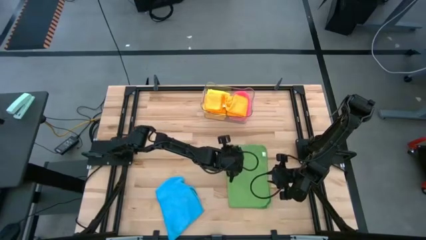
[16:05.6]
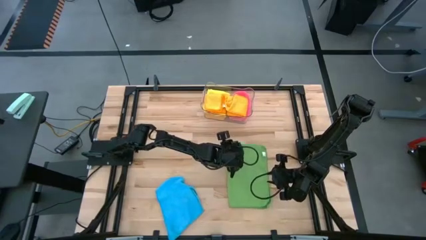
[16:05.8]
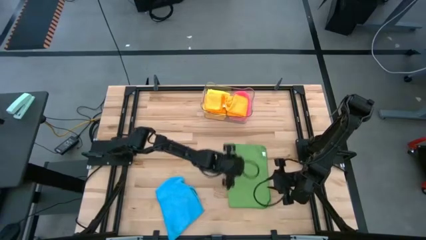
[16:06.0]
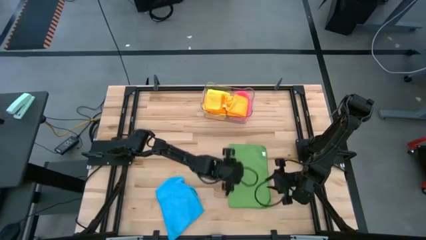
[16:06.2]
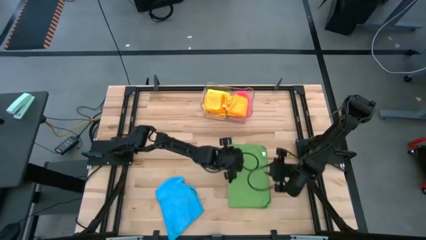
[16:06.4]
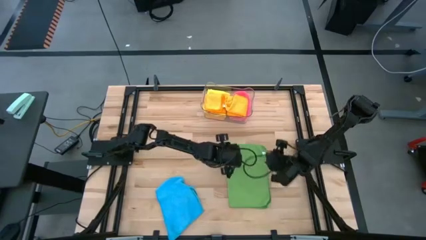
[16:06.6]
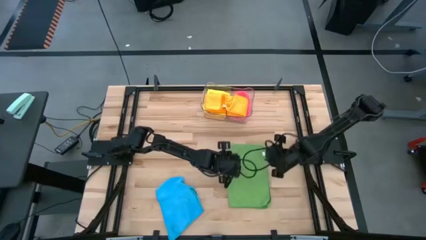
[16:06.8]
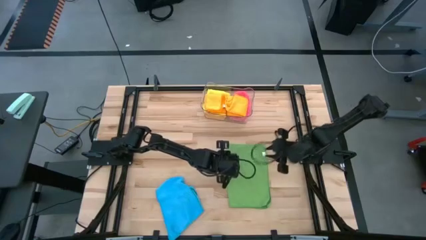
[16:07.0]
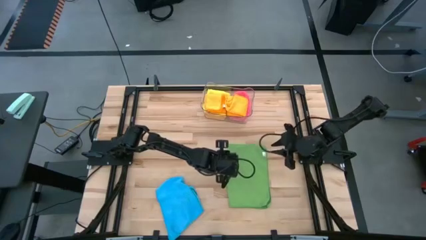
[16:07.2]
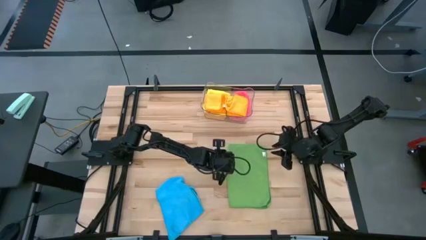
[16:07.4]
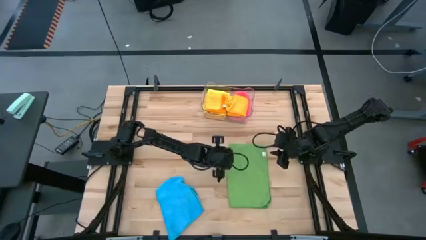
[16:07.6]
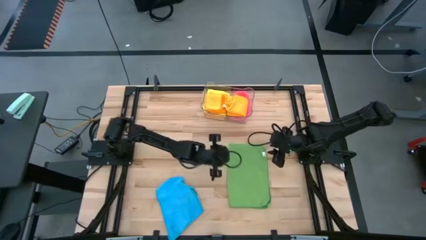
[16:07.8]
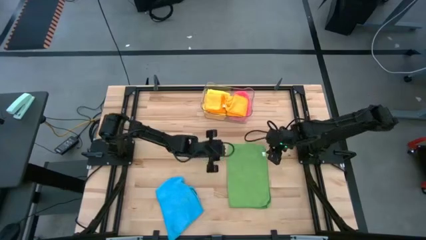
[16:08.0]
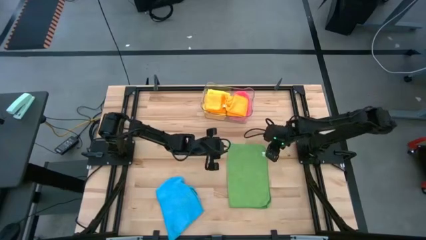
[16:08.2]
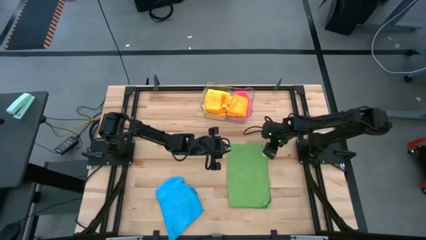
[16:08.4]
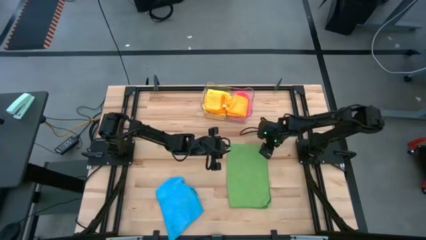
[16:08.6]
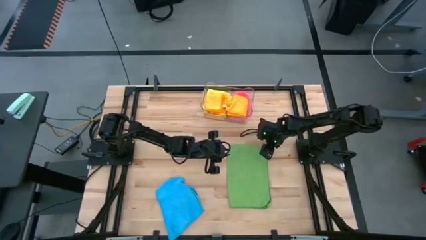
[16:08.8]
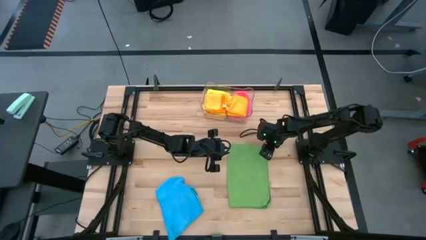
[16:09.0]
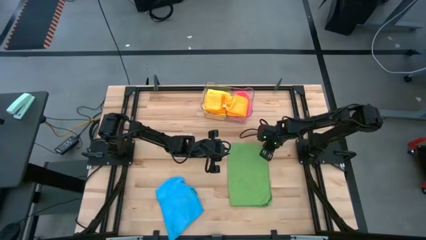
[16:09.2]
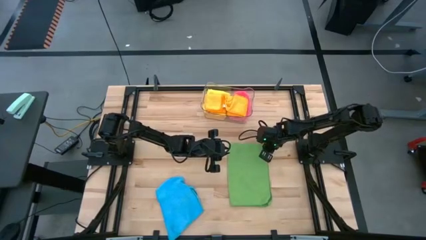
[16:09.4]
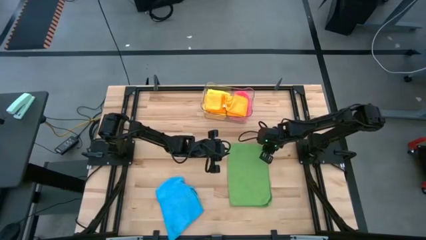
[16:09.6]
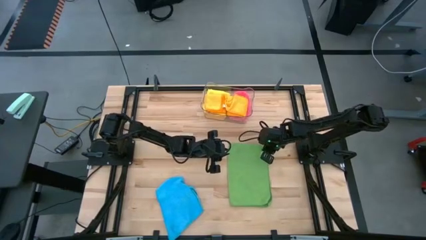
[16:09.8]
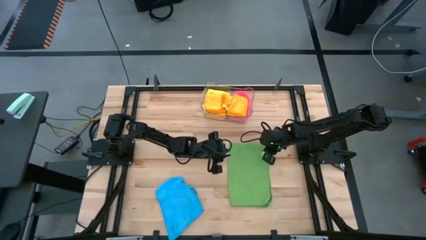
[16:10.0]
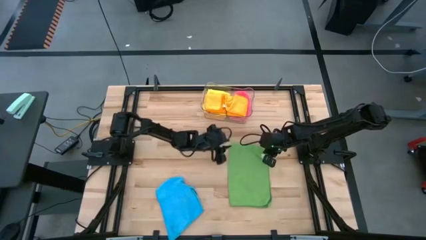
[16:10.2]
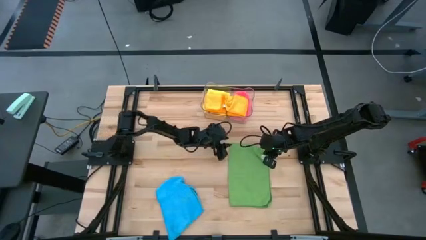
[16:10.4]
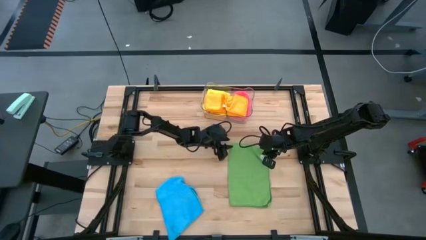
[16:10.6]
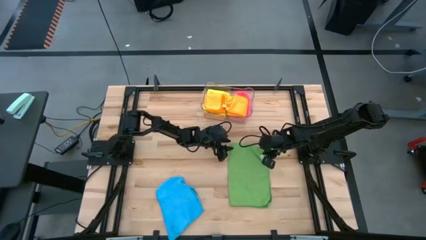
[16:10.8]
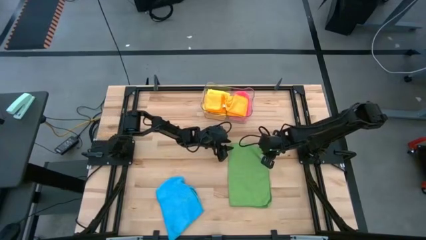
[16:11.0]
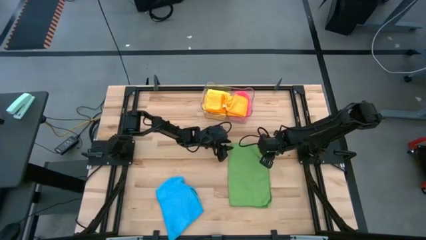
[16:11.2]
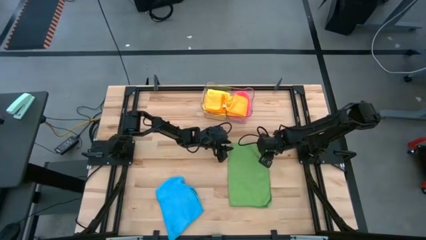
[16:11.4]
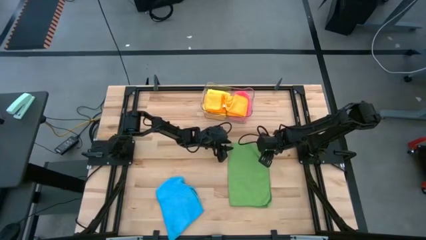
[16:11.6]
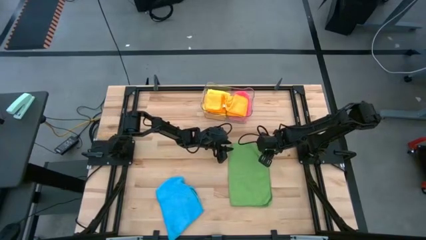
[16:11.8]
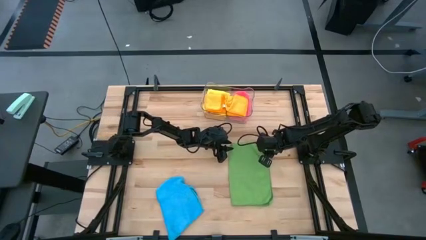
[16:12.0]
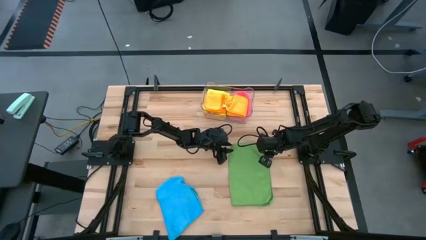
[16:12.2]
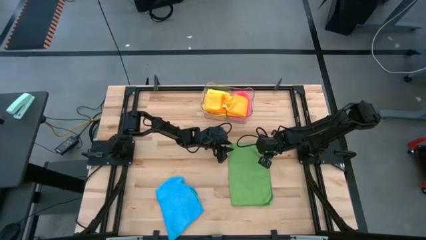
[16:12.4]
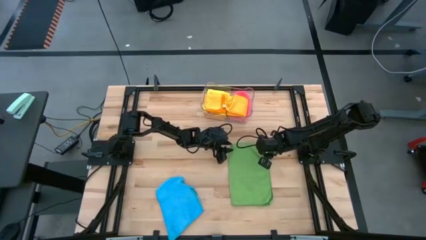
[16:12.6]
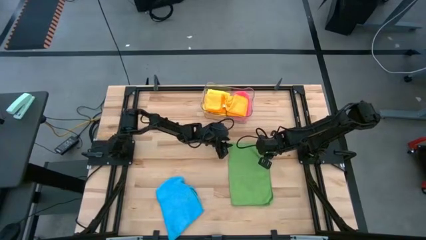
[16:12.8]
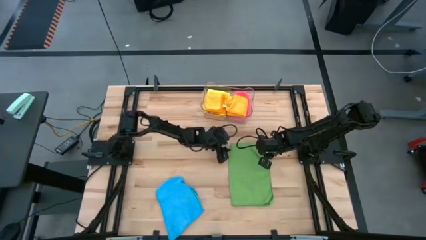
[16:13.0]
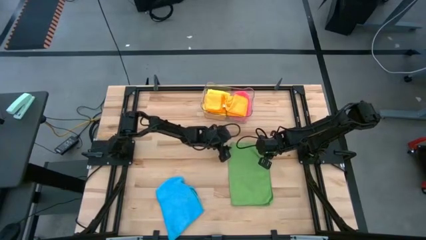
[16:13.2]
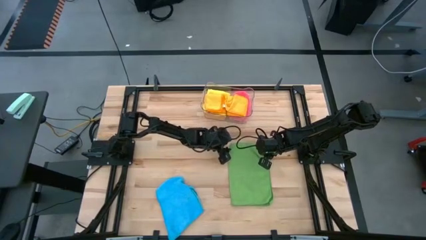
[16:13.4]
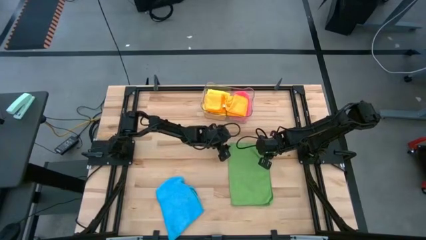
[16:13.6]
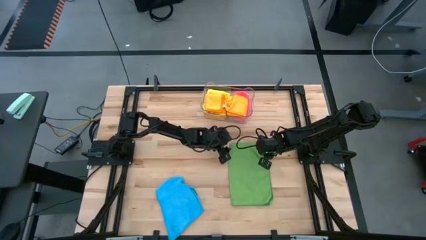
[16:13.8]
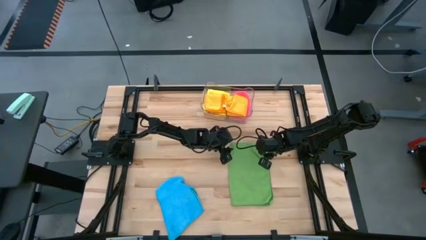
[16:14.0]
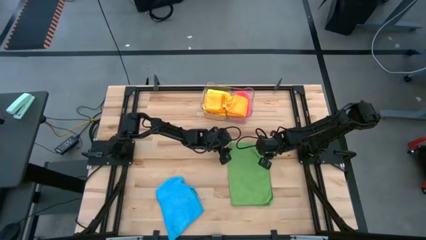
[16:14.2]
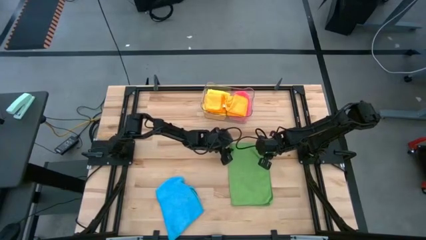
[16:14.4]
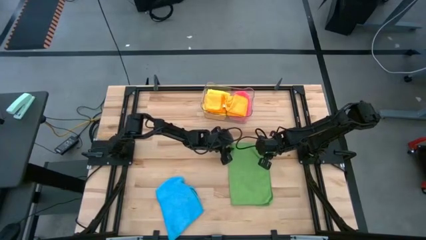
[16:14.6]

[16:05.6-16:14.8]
Task: Fold microfiber towels
Fold the green microfiber cloth

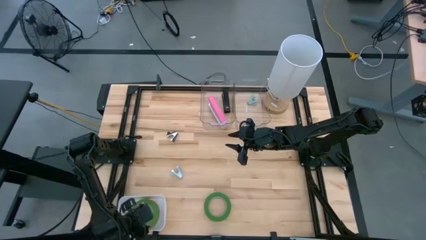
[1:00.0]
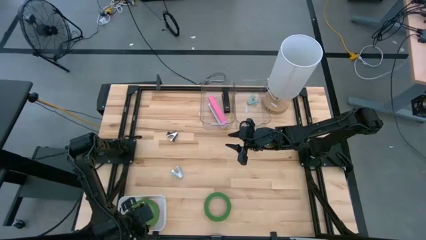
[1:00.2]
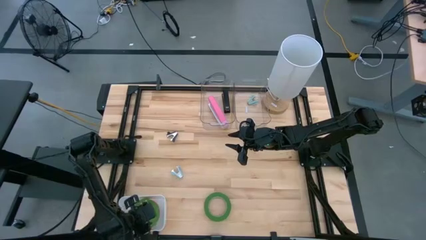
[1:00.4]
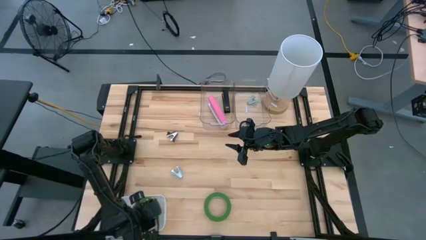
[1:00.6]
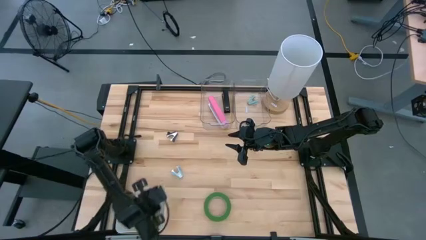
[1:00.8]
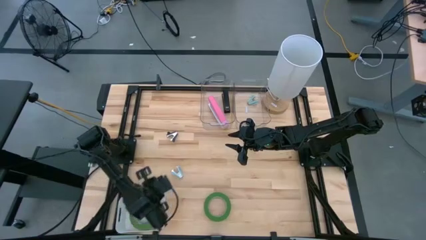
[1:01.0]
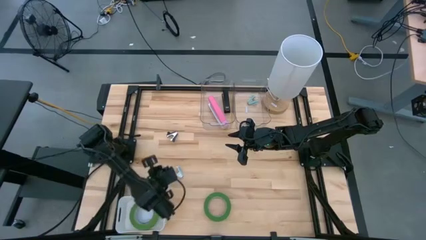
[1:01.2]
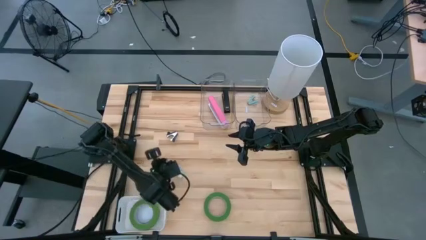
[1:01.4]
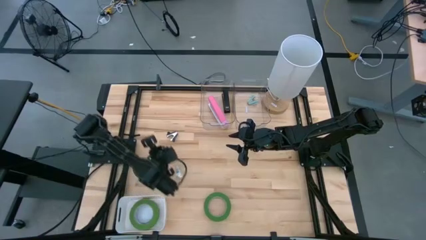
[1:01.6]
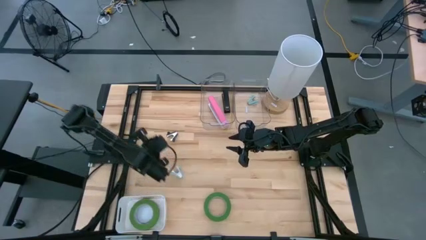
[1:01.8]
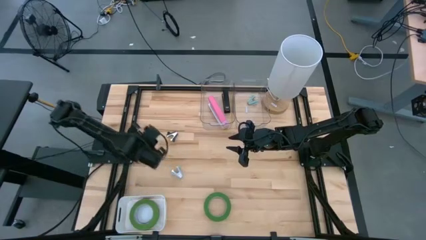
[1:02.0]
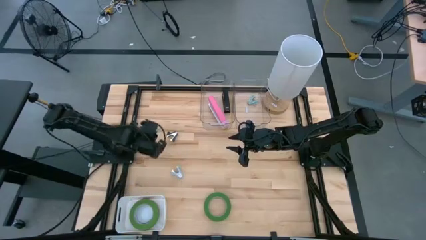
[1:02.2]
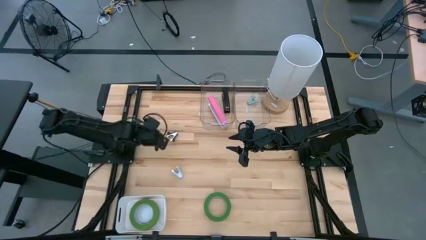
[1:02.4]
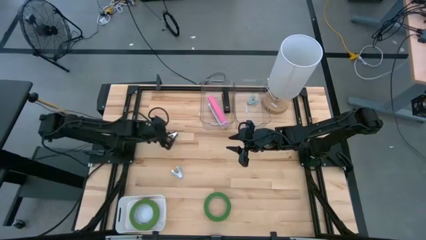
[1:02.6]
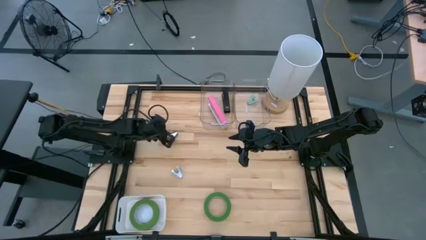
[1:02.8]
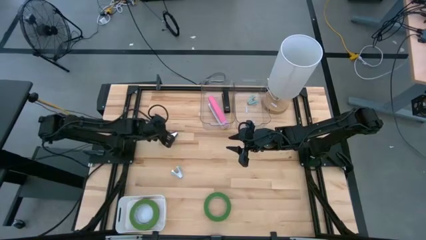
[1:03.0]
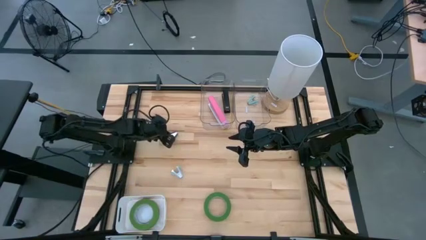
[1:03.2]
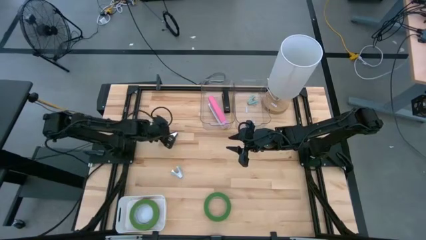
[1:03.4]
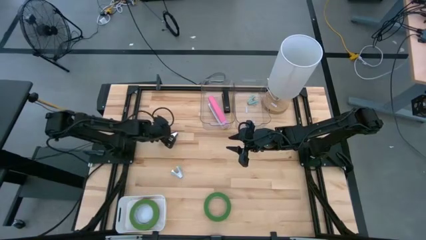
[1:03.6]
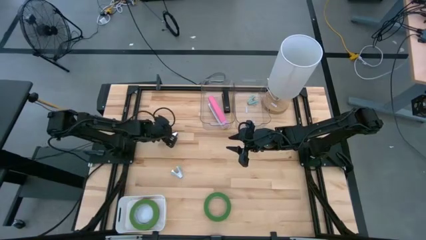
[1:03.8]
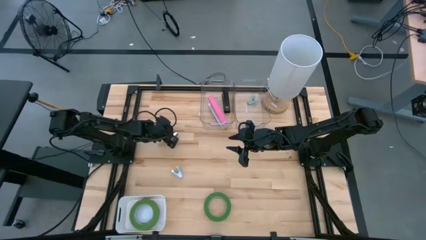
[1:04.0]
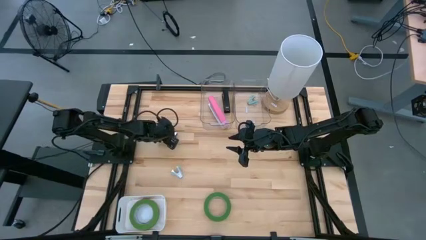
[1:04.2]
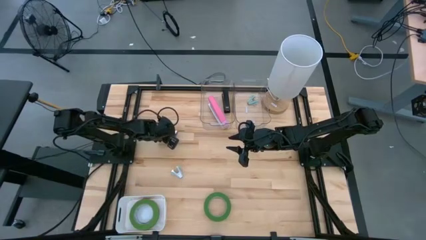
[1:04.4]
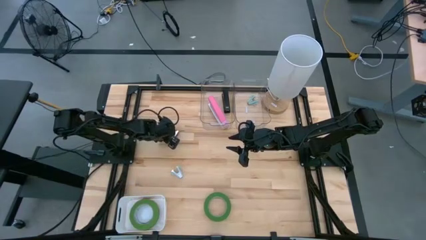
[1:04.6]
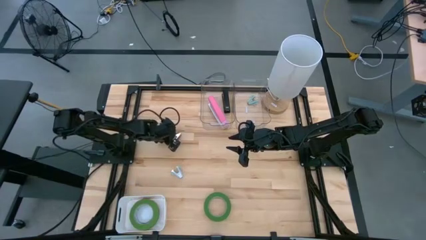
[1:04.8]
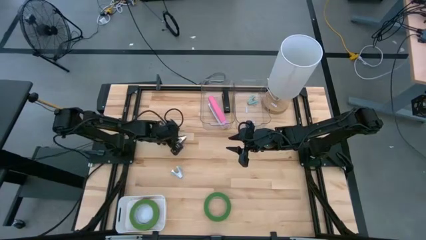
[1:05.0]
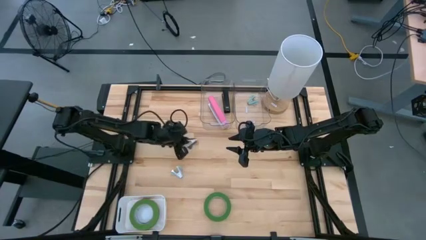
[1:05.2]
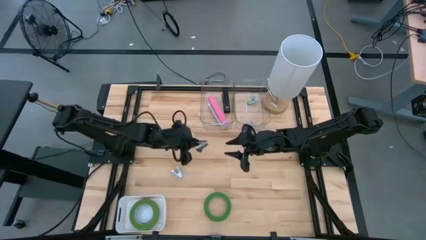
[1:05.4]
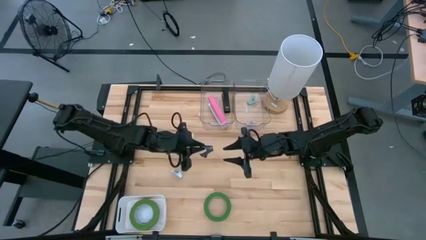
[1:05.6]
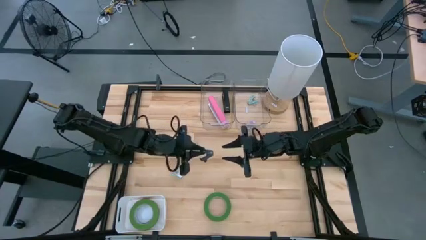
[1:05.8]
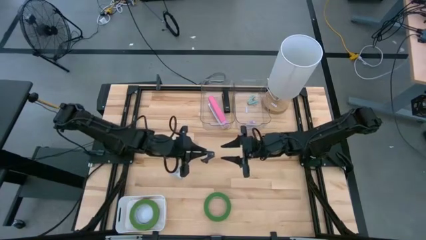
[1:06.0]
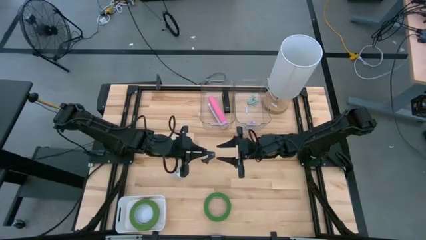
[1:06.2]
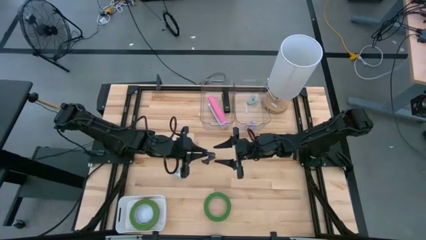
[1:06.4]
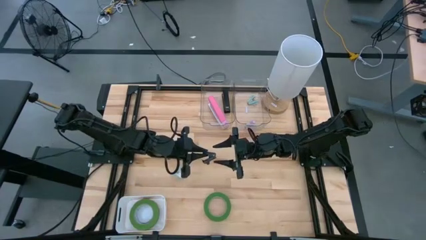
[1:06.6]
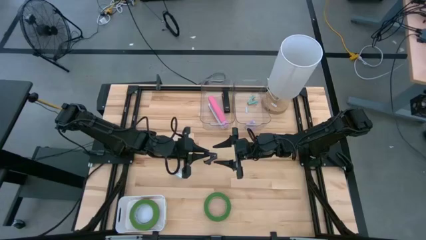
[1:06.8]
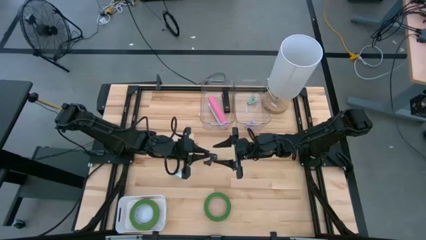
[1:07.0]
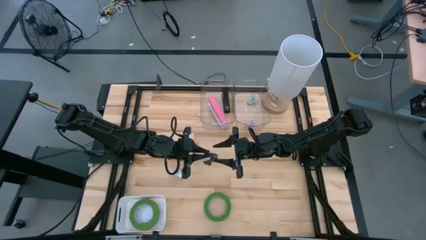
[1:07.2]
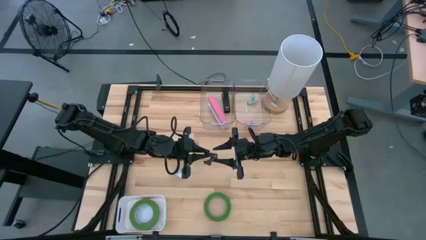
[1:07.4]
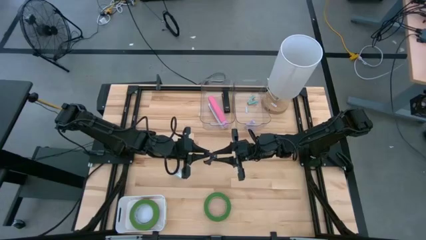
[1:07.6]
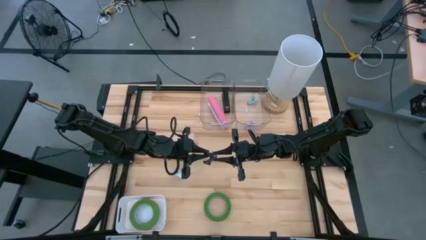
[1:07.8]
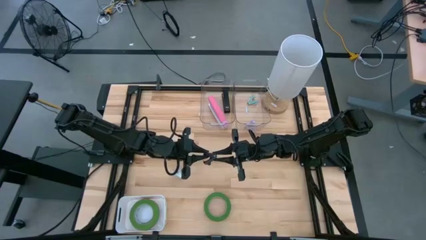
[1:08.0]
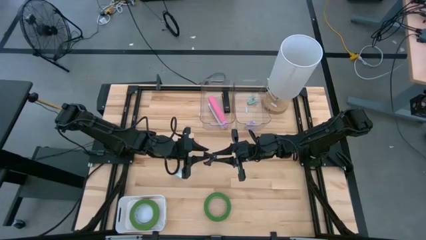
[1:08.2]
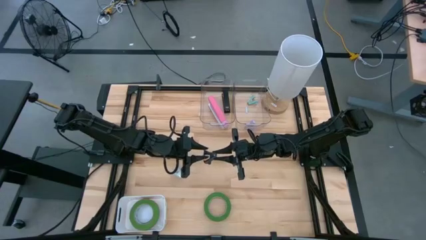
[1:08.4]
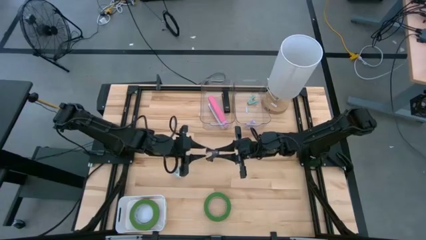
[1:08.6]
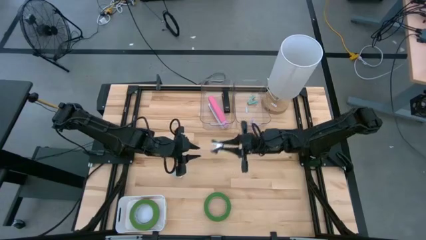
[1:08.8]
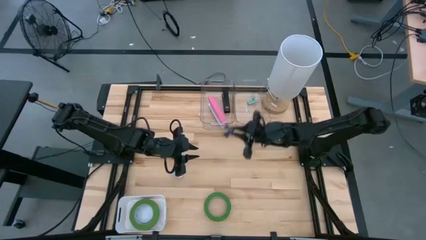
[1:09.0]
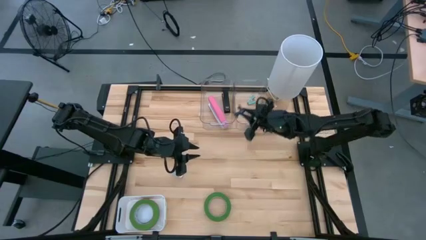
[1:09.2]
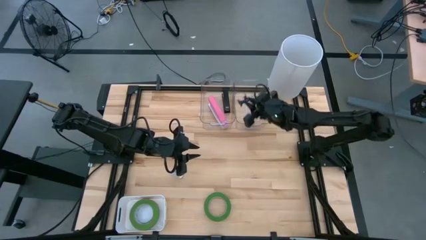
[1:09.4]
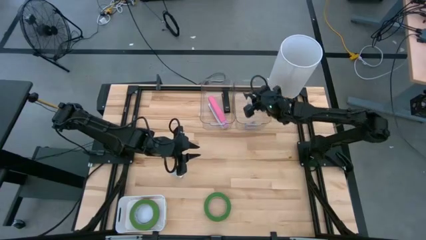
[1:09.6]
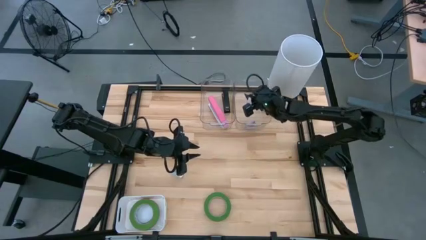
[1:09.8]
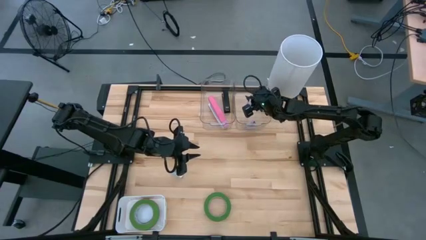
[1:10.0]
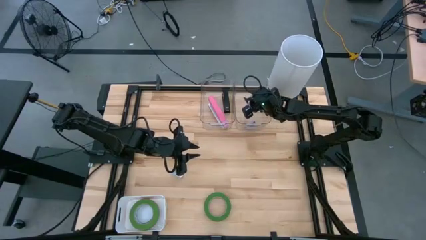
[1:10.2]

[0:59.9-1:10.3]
Task: Pick and place Stapler, Stapler remover, tape
Put the black staple remover into the right transparent bin
